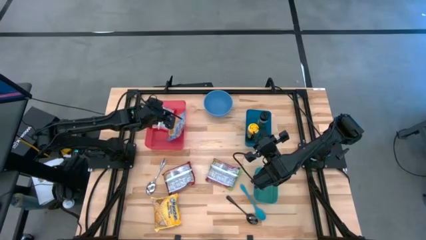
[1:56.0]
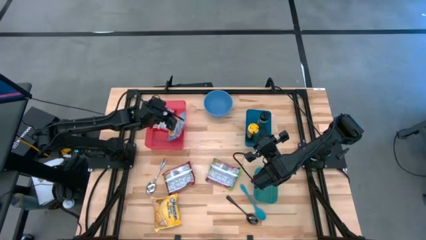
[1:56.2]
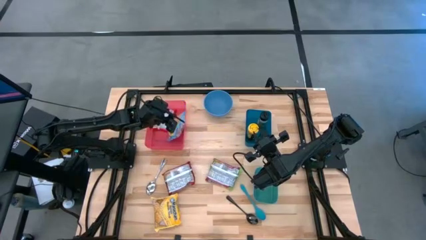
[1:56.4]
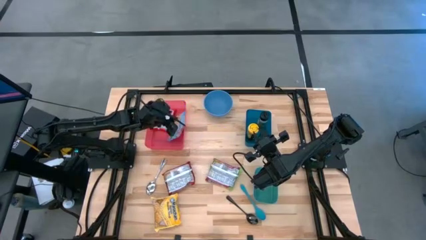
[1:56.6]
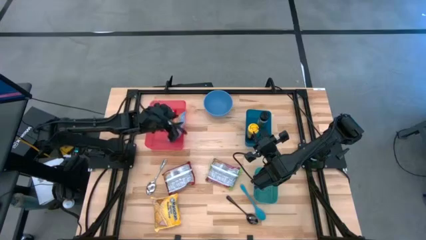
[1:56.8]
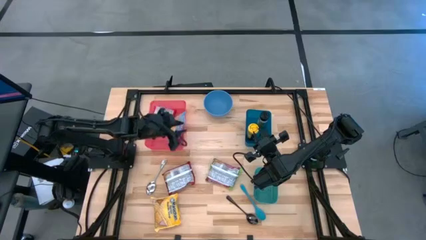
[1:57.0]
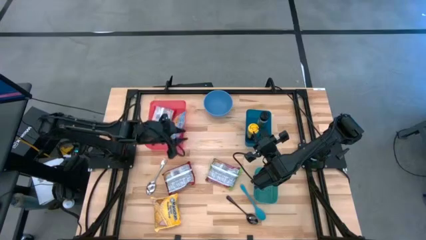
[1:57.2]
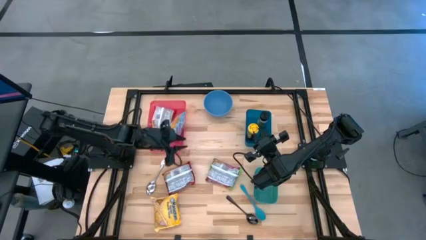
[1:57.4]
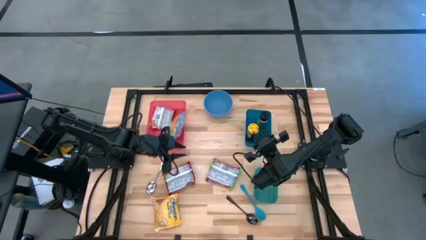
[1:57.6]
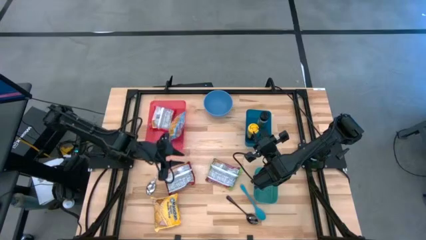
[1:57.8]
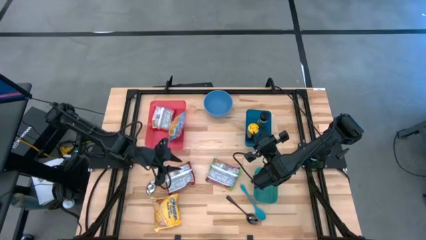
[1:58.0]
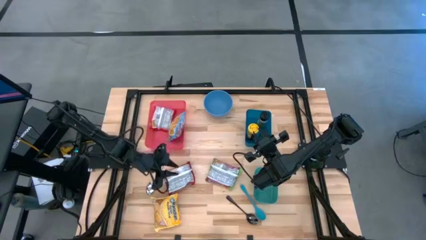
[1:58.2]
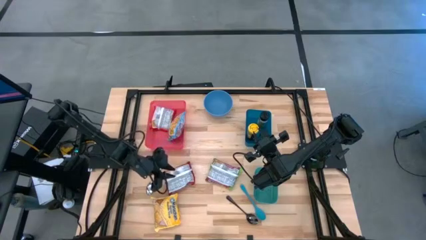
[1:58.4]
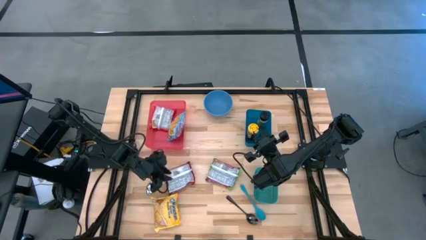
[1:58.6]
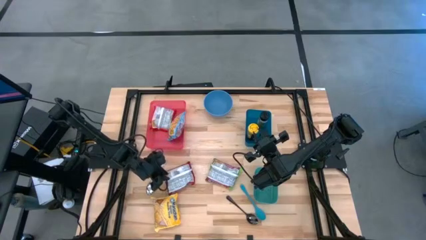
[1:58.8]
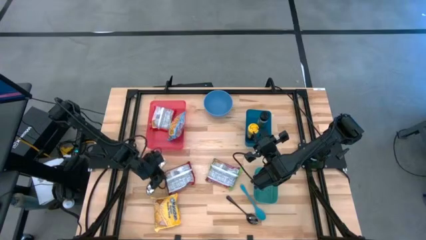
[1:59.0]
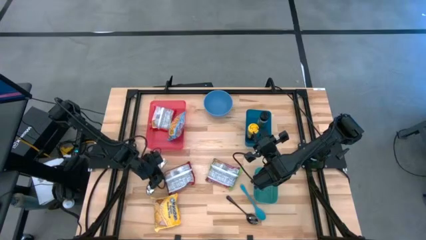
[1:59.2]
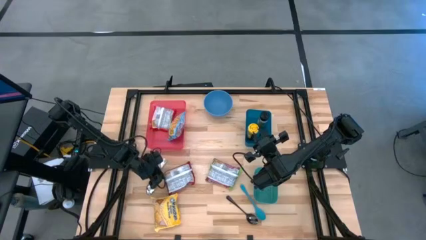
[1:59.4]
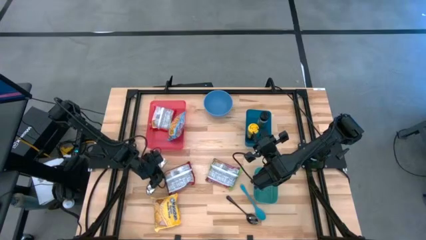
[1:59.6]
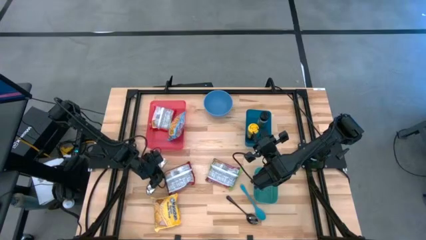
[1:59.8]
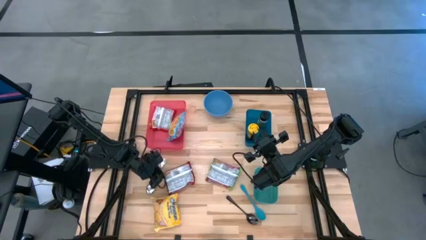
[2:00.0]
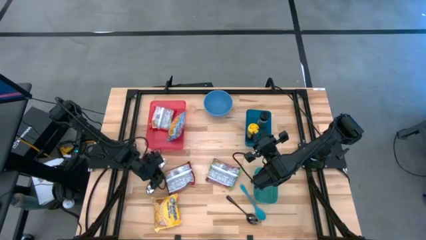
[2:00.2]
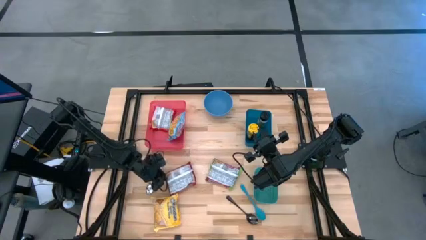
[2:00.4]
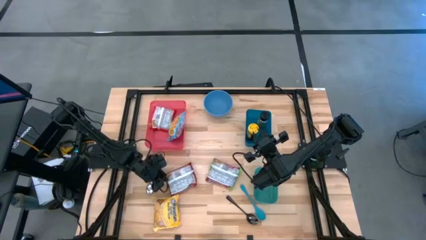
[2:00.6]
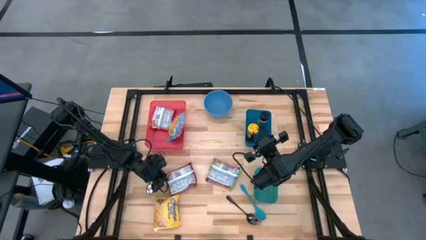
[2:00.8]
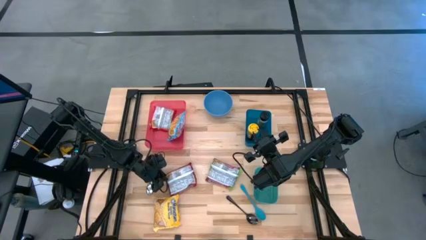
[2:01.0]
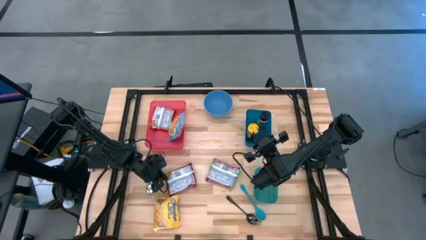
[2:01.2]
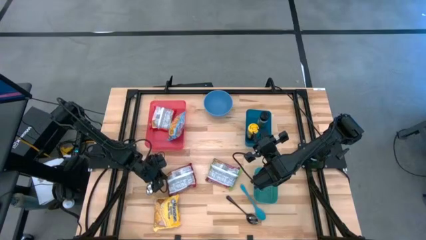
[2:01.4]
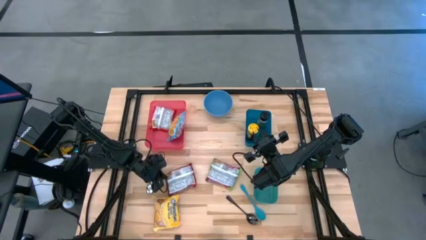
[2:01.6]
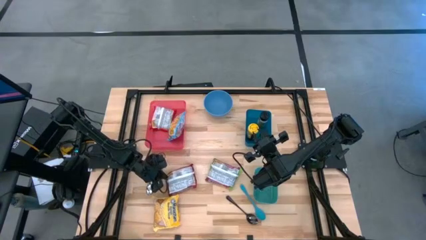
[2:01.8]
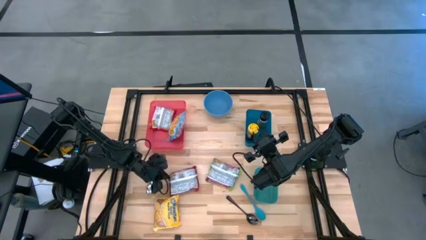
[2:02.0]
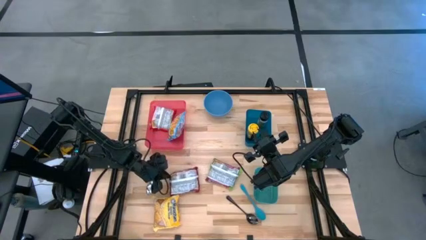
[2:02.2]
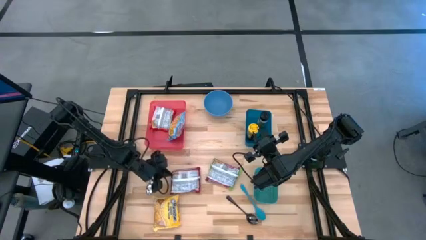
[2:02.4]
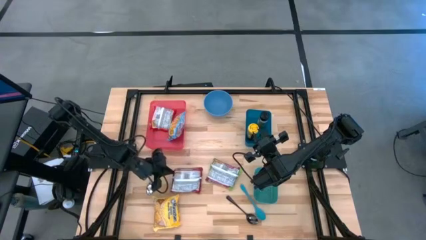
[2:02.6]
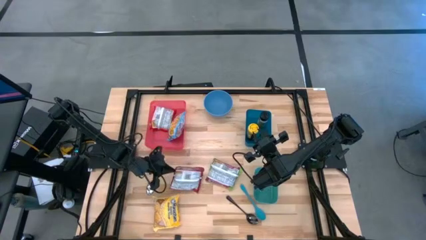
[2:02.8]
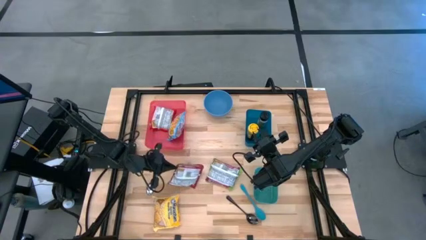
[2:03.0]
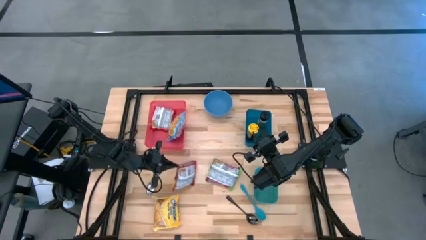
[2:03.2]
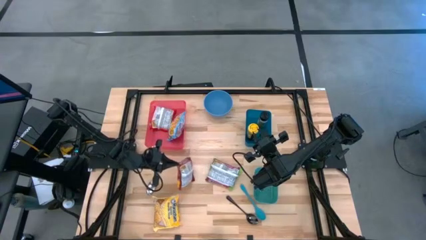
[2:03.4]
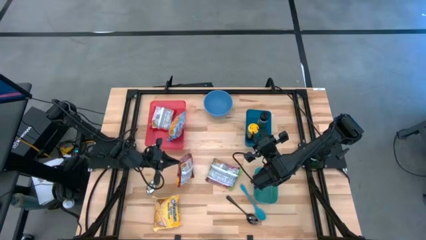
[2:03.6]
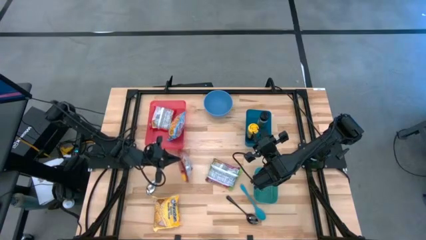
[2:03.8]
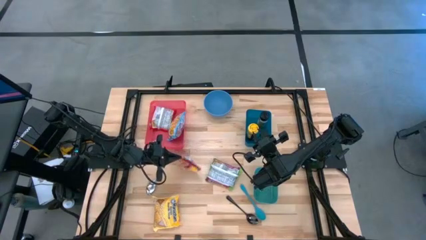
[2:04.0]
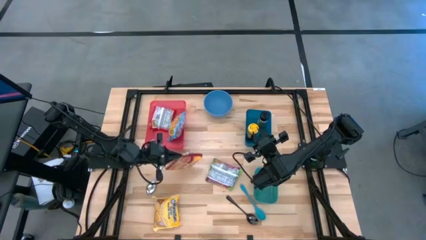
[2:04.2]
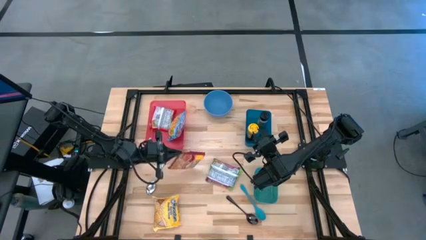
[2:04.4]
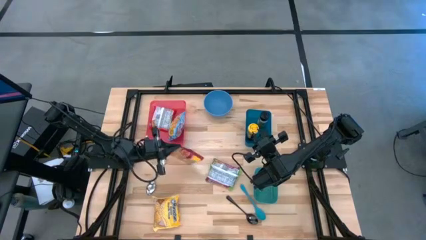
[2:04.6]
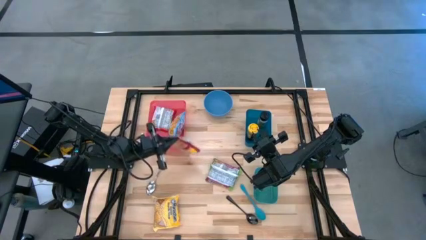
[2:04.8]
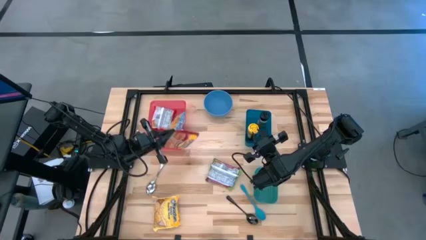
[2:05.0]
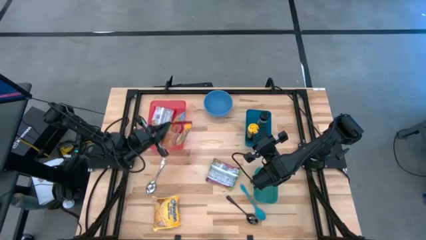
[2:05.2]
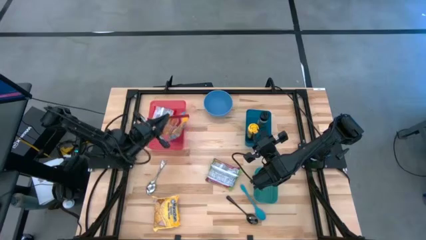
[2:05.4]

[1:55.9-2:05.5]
Task: Pick & Place Food Item
Put the red noodle pack into the red bin

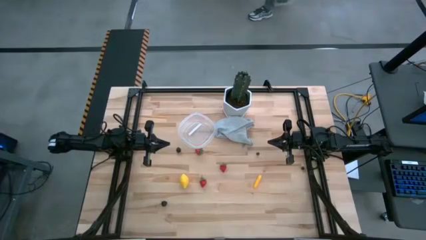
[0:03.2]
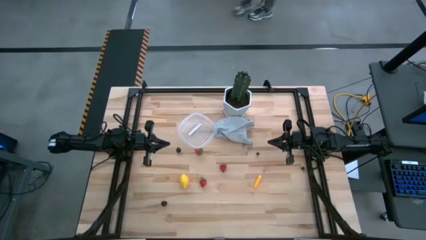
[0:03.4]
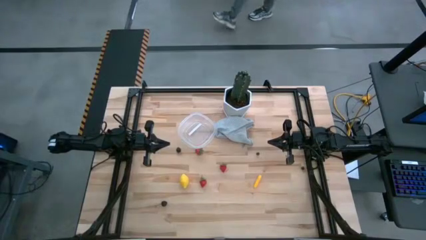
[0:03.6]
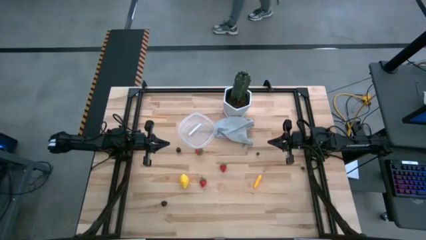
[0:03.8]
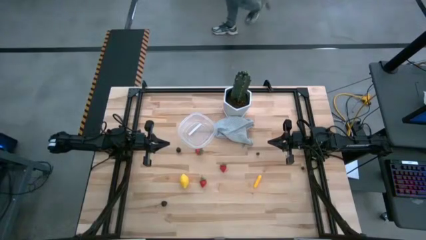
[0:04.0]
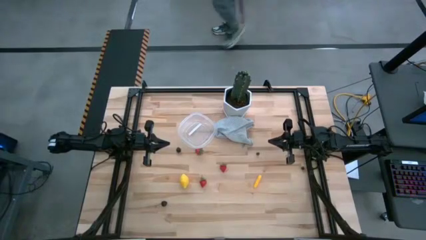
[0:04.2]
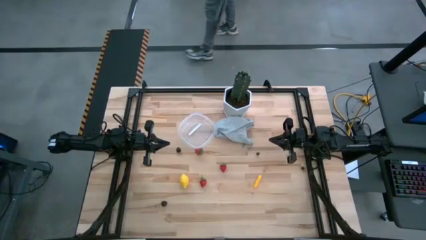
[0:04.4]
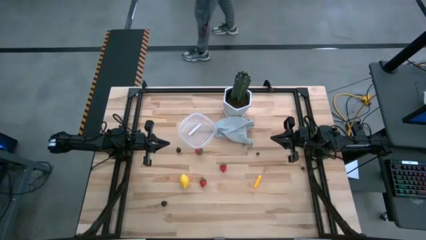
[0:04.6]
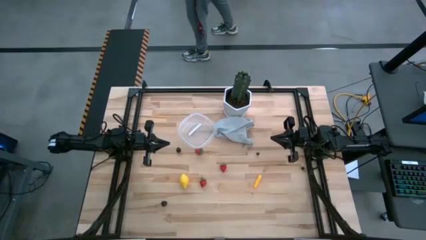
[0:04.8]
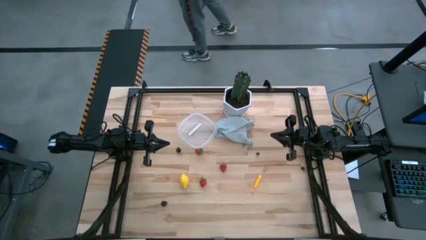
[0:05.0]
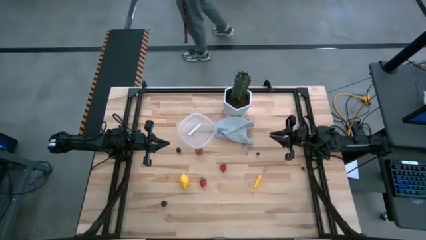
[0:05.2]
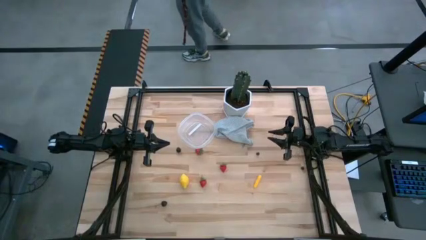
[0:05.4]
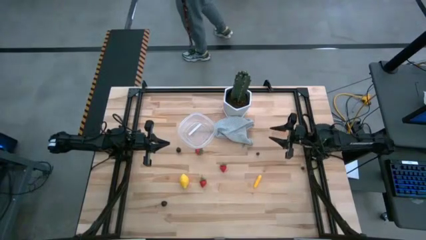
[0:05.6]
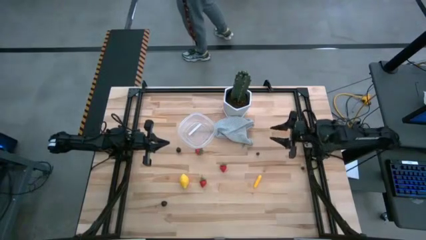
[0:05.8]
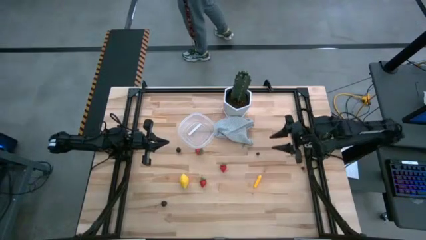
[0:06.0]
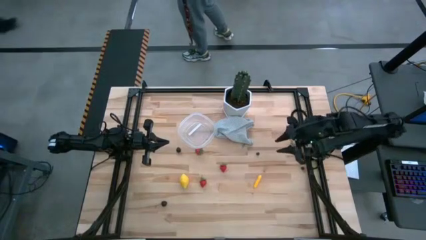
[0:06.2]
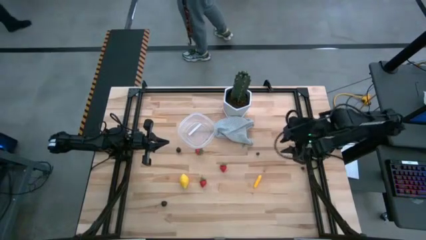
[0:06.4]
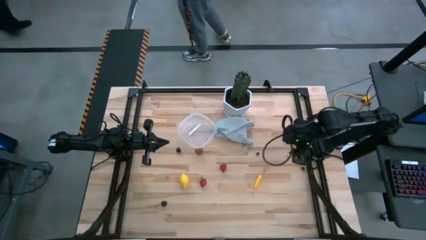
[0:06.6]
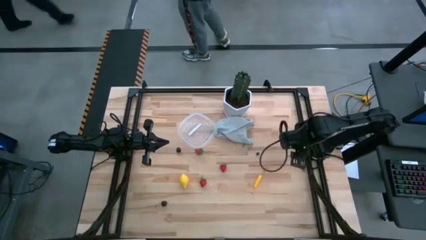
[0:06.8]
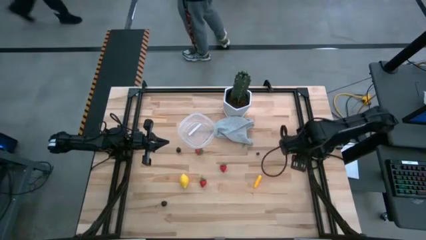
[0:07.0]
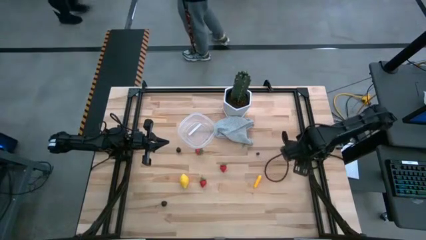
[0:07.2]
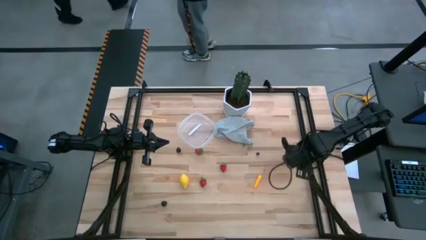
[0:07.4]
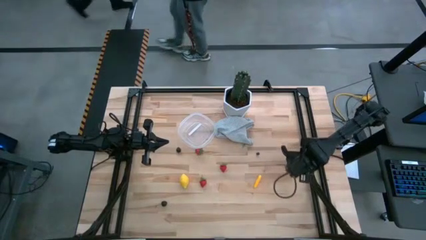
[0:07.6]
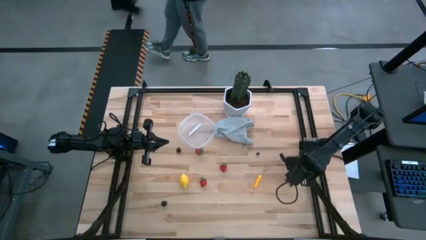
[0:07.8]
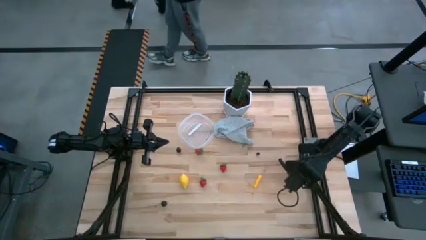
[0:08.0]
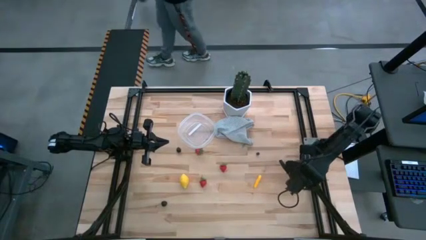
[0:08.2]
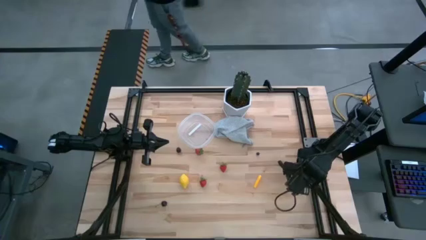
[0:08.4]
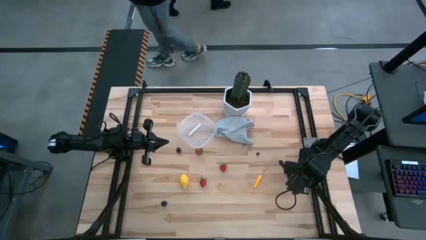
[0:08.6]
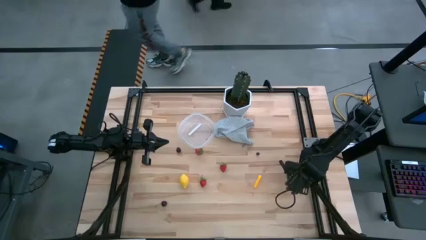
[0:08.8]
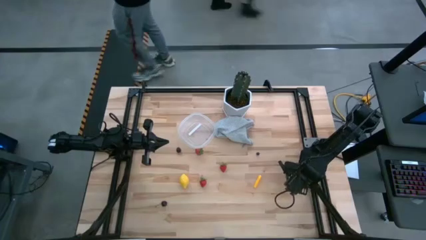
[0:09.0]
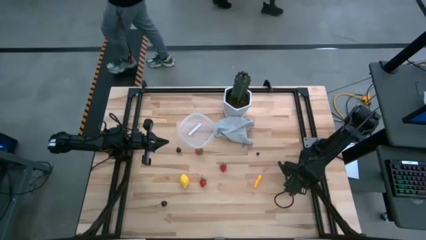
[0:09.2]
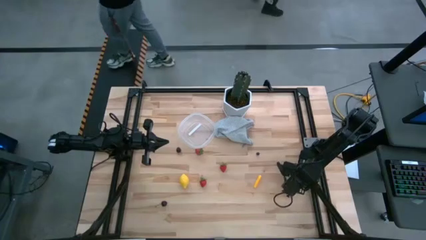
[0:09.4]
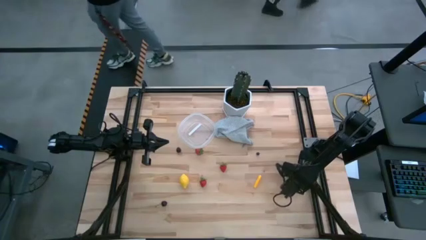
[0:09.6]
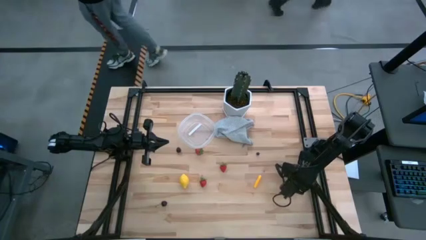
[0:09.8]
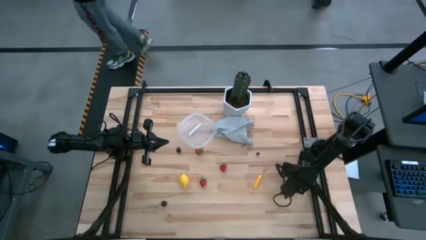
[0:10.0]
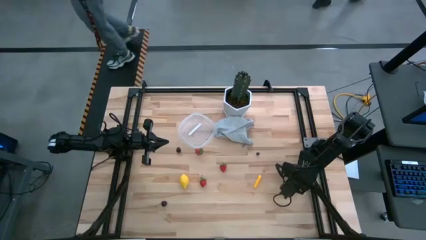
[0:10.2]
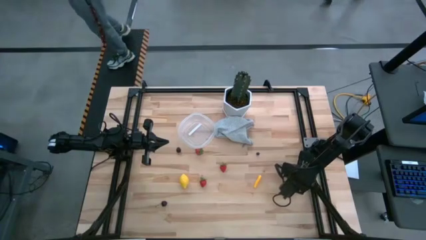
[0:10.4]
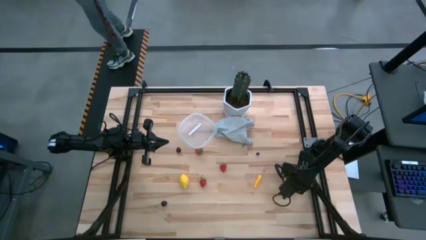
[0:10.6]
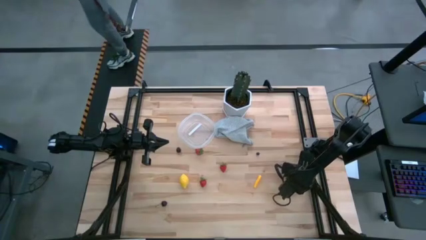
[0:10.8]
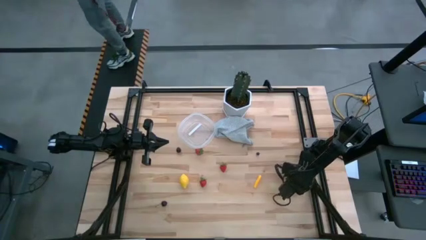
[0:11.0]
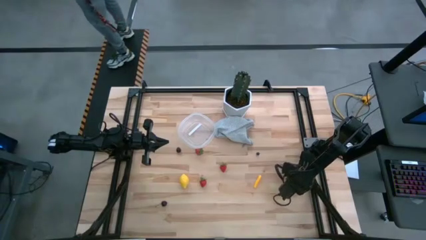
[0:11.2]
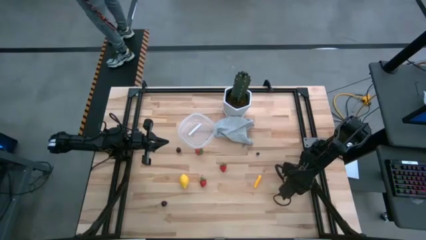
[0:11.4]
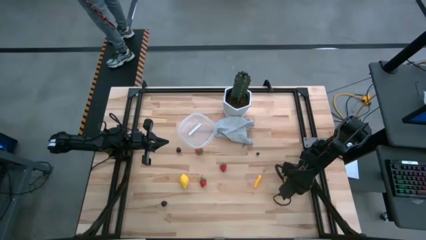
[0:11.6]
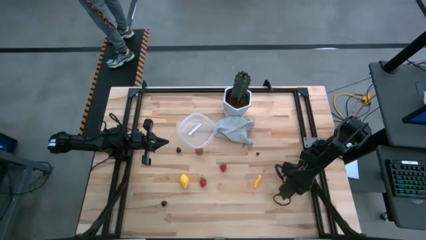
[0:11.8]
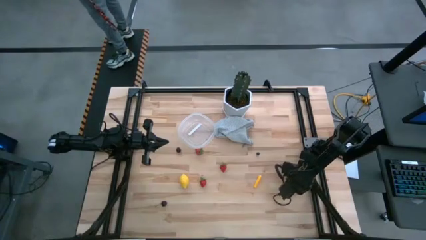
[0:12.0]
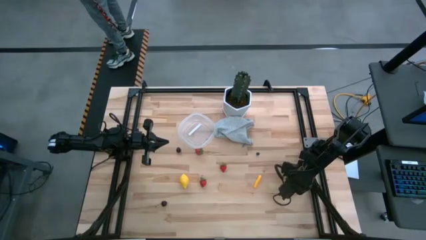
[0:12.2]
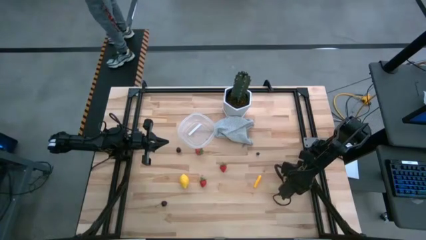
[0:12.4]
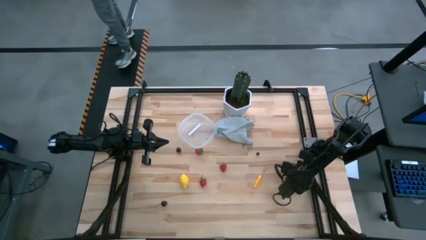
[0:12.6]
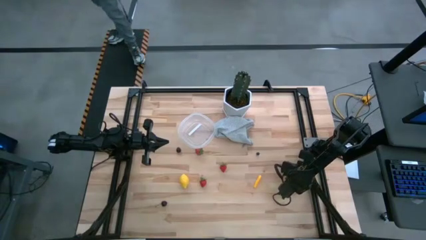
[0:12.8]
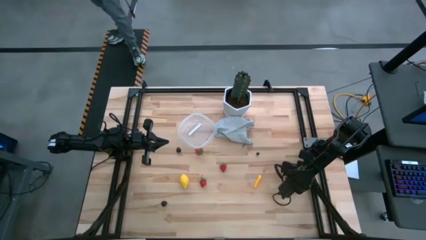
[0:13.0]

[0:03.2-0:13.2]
Task: Pick and placing Produce into tupperware
Put the bottom blueberry into the transparent bin
